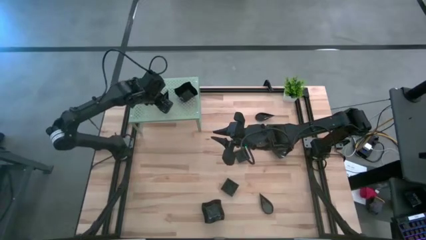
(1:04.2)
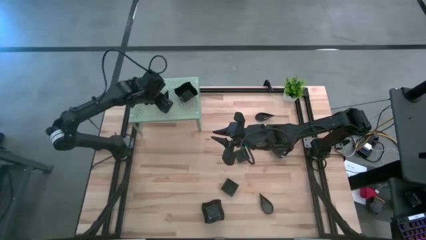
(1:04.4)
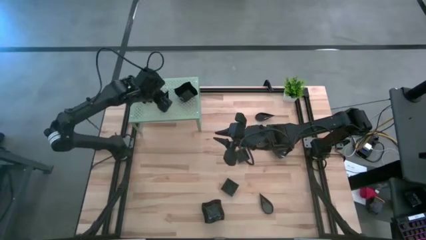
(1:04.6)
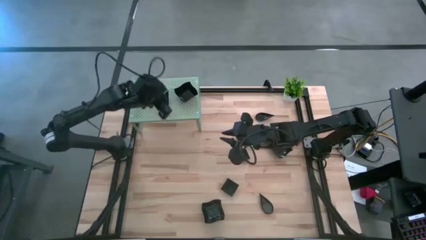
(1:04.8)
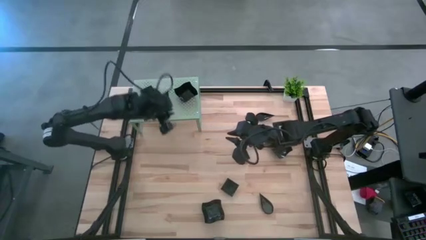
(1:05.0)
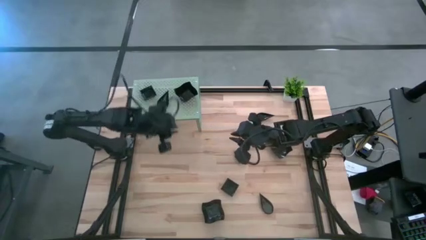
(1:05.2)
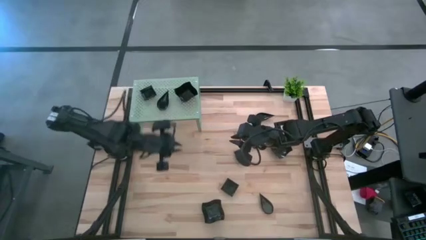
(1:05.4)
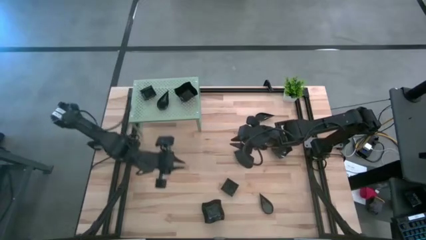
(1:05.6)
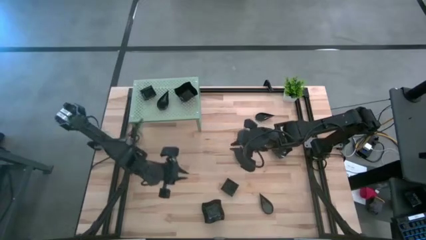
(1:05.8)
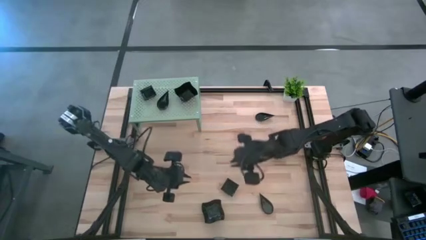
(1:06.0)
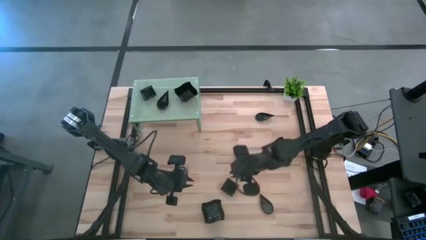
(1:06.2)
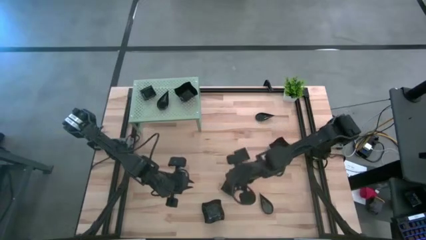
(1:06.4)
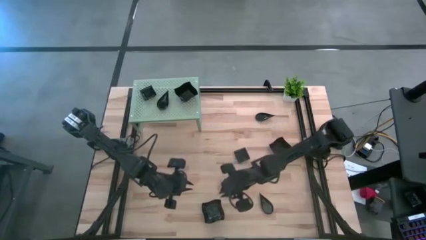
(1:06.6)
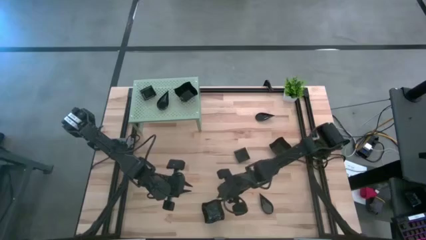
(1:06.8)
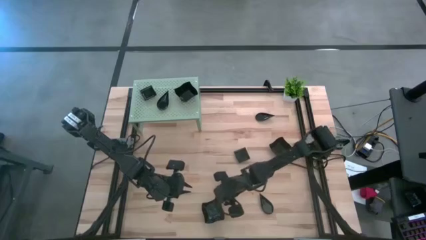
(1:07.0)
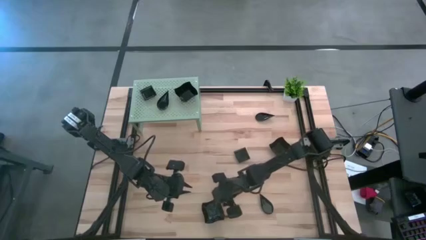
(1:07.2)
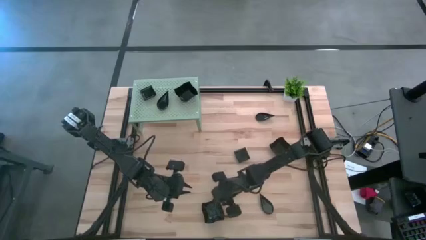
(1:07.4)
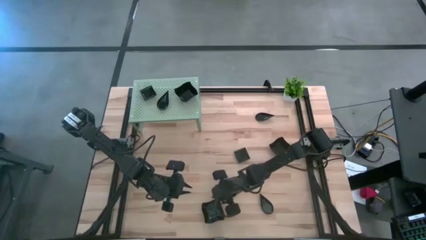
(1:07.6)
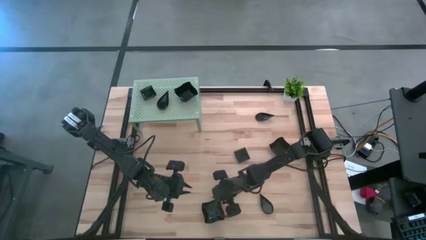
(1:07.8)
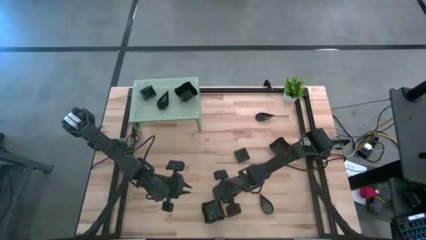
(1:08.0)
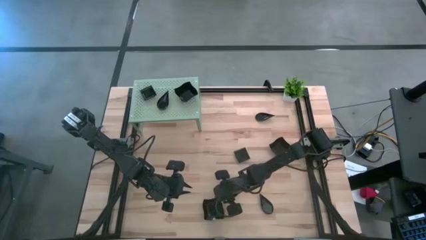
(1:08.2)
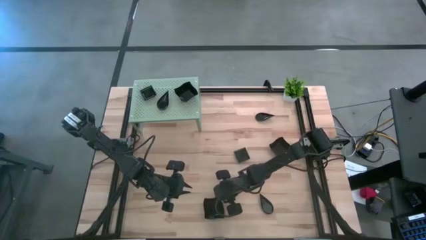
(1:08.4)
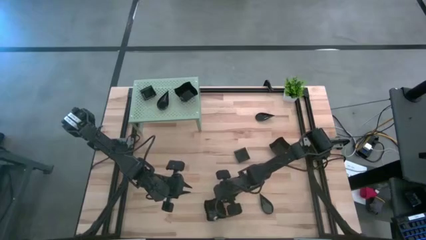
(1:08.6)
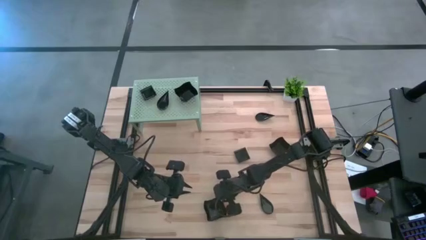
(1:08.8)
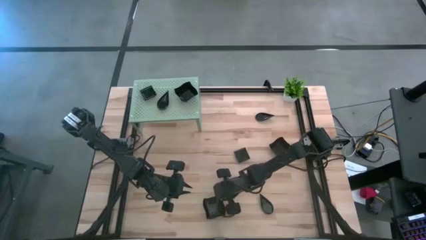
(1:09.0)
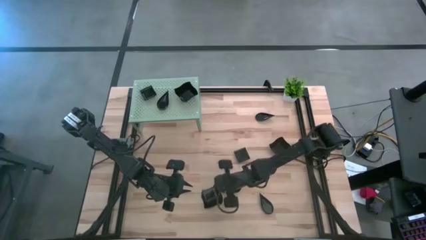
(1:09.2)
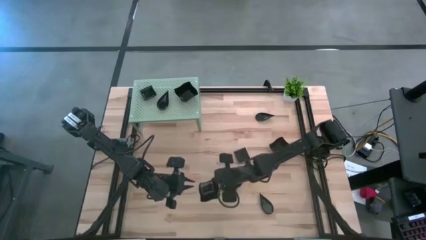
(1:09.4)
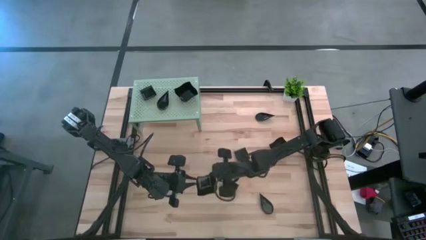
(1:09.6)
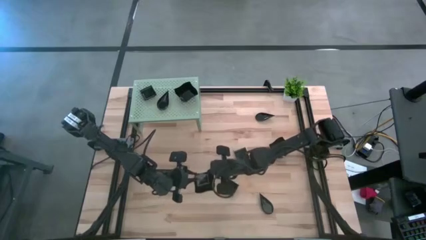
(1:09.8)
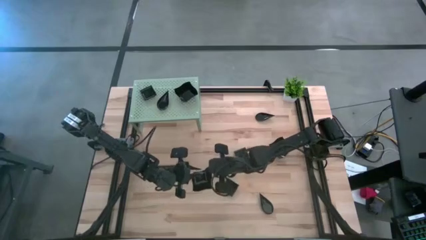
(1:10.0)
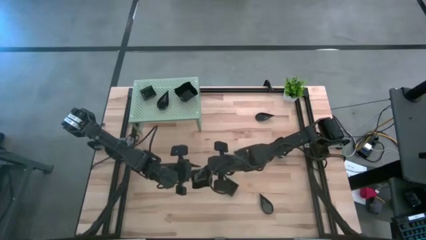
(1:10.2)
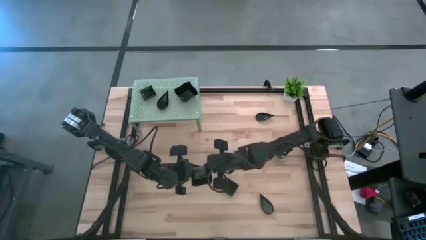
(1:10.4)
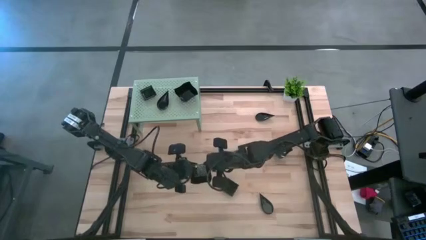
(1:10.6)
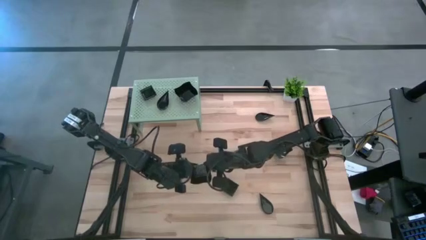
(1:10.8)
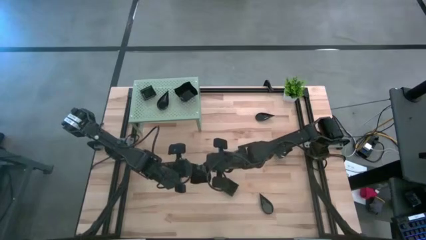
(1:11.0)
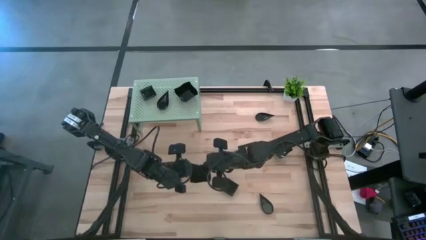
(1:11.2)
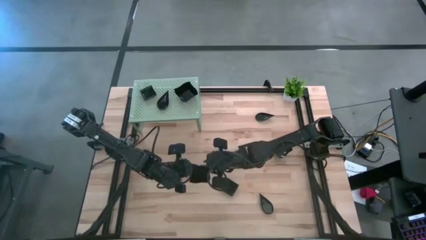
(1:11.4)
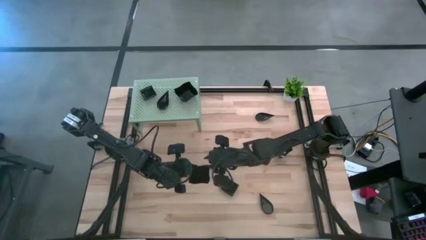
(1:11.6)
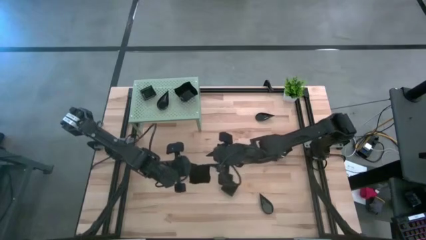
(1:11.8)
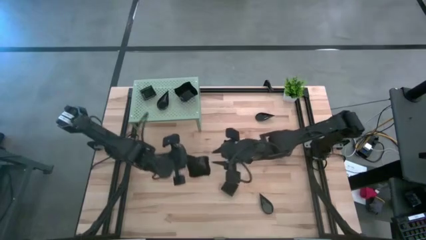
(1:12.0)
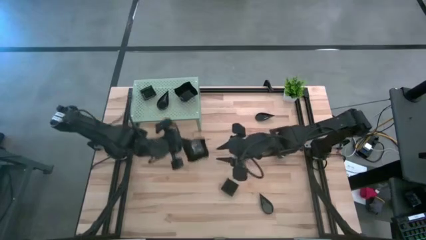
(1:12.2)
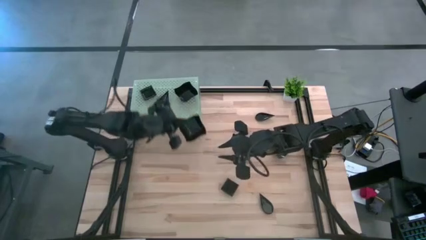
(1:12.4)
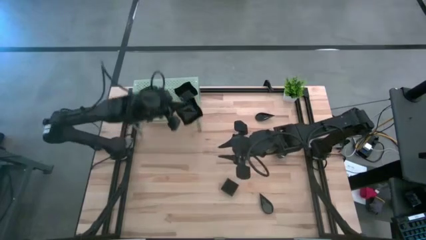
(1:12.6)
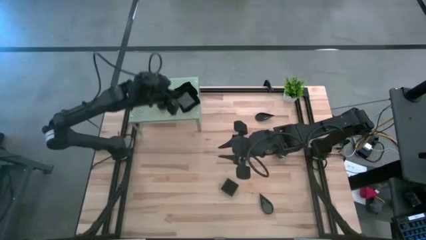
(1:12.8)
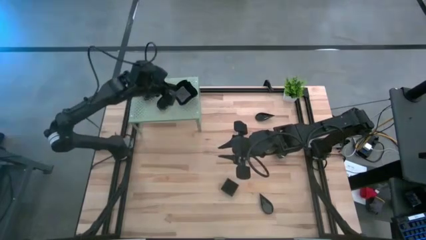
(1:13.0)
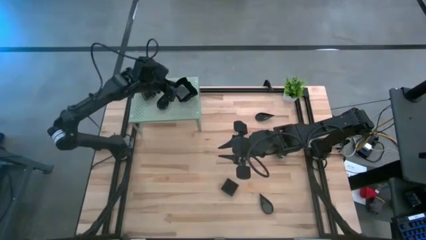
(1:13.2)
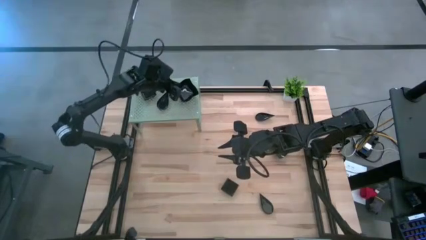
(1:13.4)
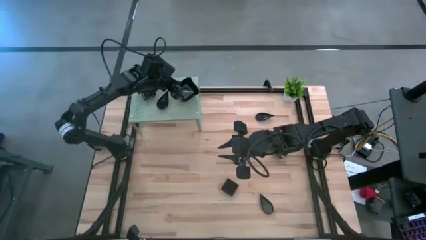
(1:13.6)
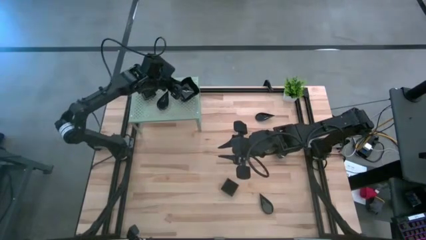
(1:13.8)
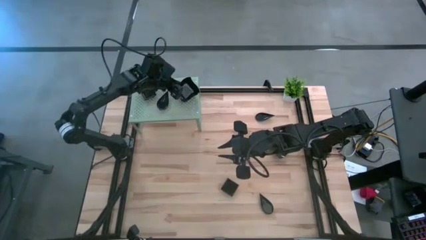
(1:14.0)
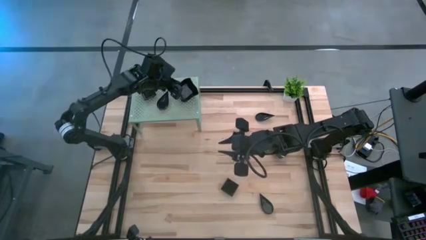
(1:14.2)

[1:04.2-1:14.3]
Task: Pick & Place Mini shaped plates
Stack the black distorted square plate on top of the black distorted square plate on the shelf
